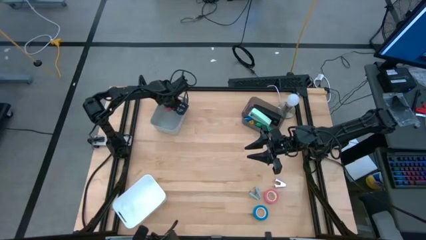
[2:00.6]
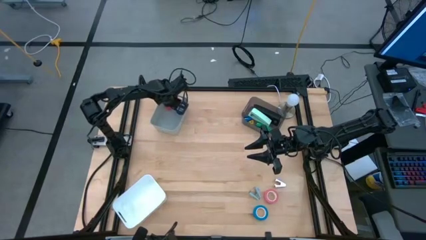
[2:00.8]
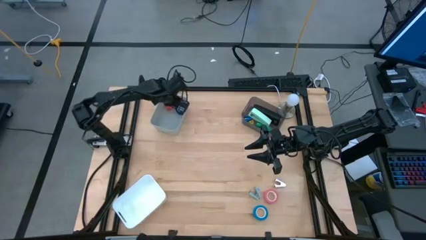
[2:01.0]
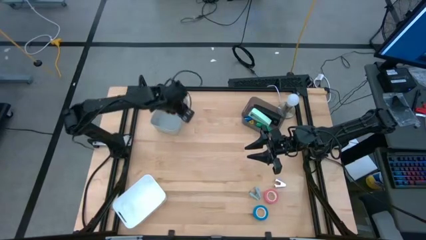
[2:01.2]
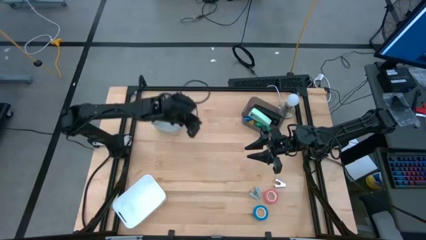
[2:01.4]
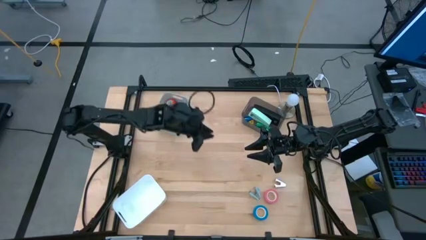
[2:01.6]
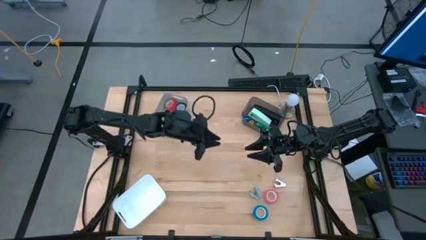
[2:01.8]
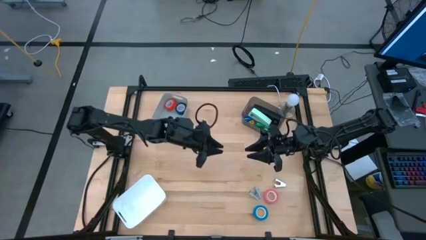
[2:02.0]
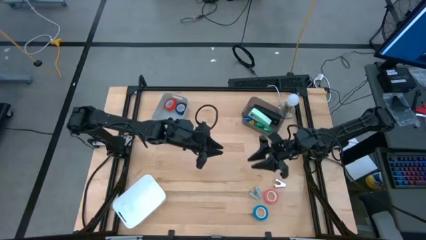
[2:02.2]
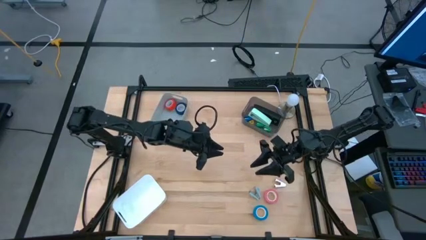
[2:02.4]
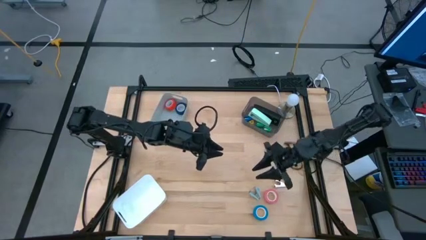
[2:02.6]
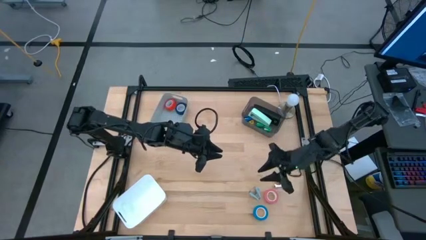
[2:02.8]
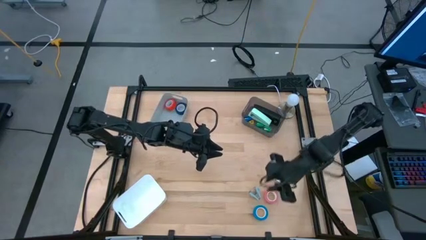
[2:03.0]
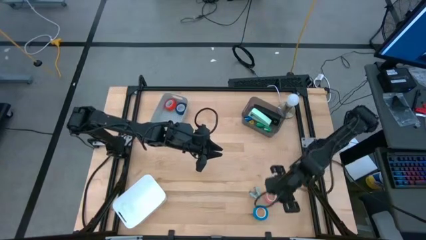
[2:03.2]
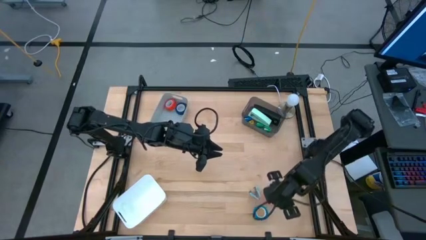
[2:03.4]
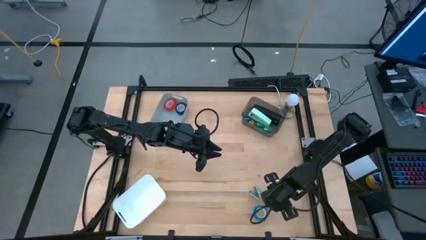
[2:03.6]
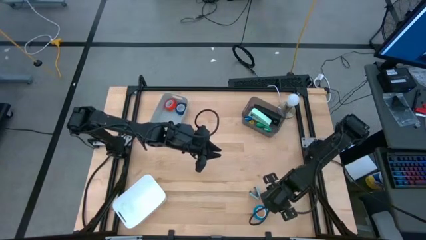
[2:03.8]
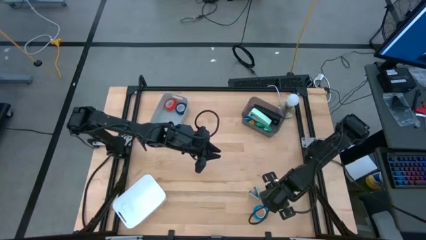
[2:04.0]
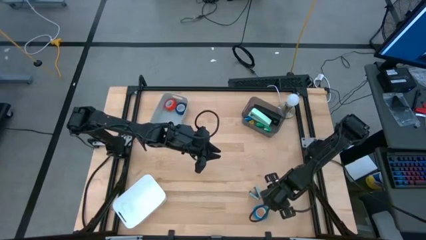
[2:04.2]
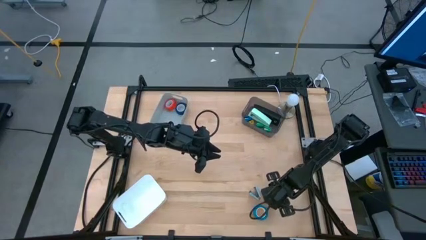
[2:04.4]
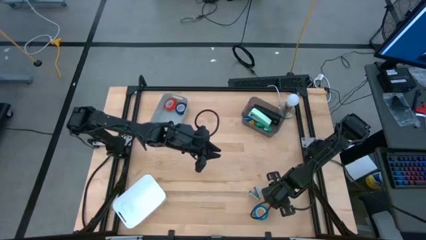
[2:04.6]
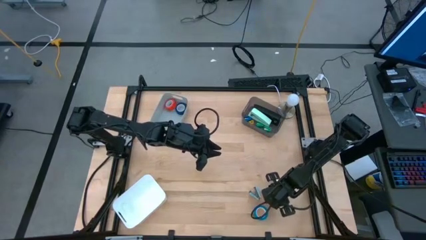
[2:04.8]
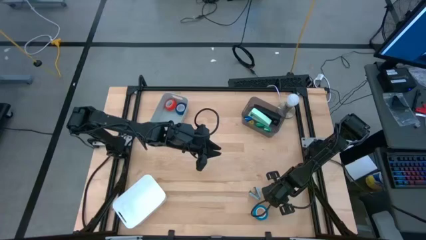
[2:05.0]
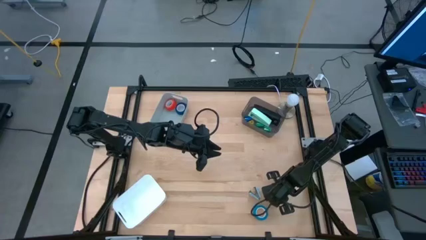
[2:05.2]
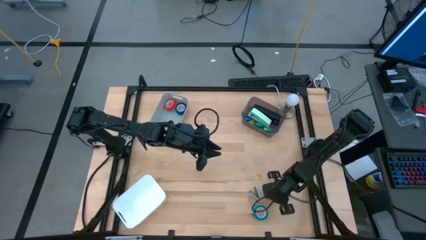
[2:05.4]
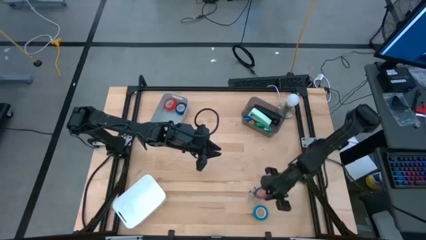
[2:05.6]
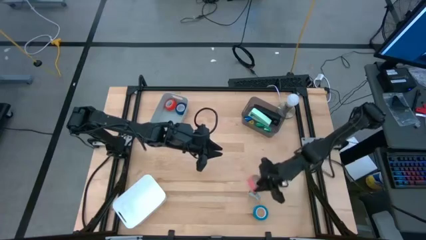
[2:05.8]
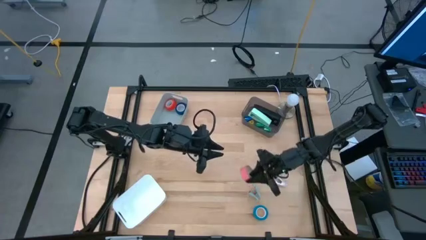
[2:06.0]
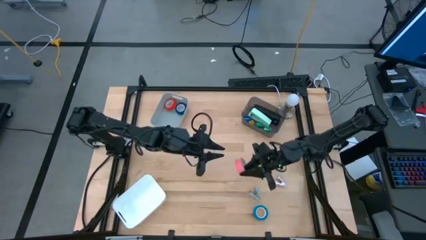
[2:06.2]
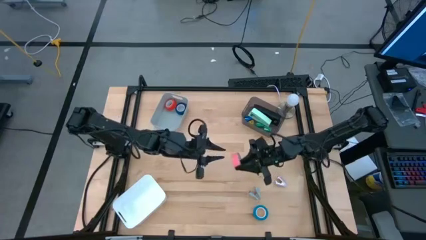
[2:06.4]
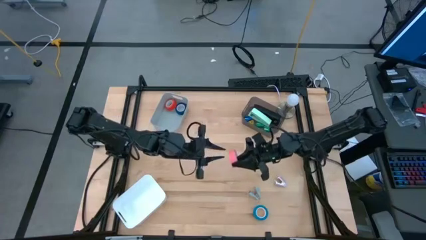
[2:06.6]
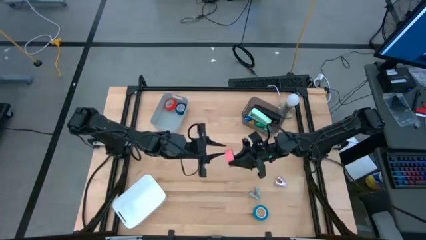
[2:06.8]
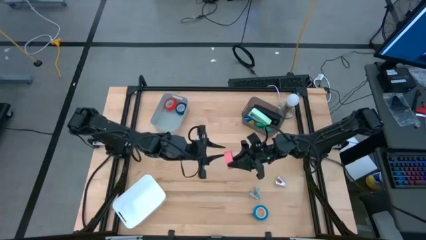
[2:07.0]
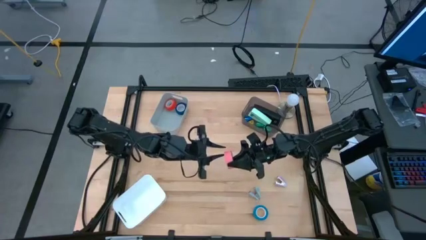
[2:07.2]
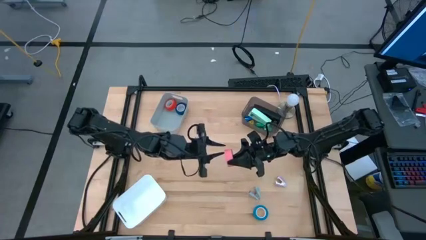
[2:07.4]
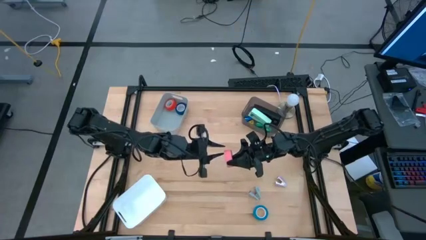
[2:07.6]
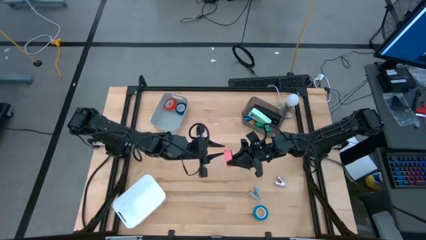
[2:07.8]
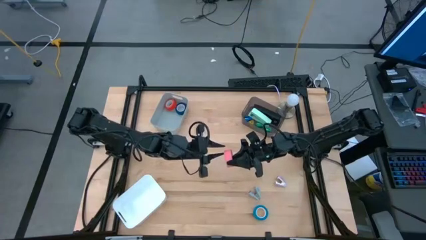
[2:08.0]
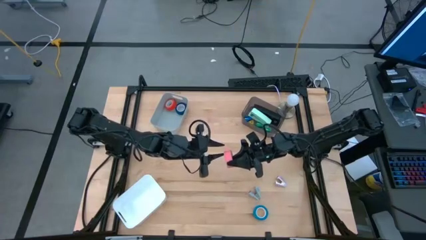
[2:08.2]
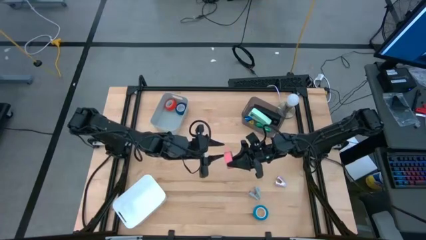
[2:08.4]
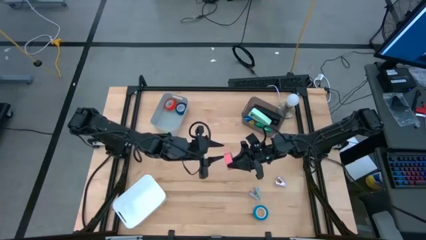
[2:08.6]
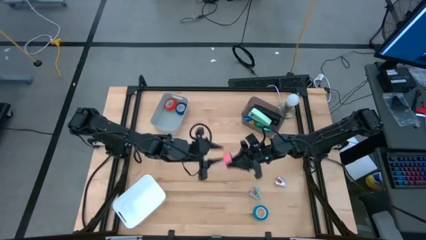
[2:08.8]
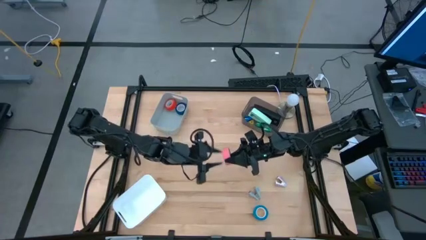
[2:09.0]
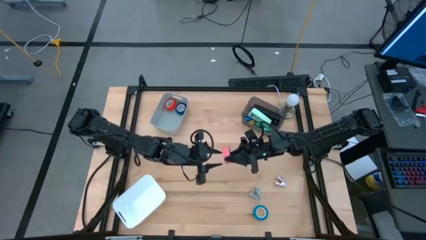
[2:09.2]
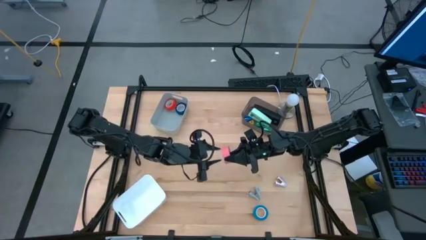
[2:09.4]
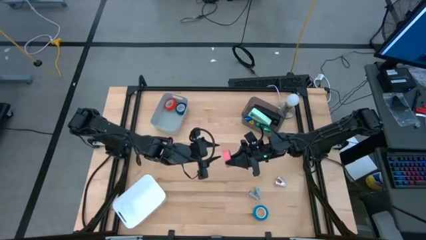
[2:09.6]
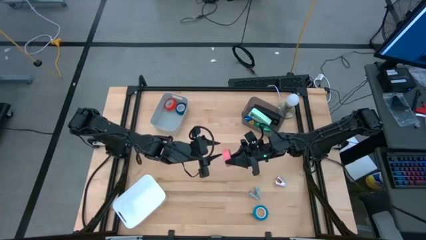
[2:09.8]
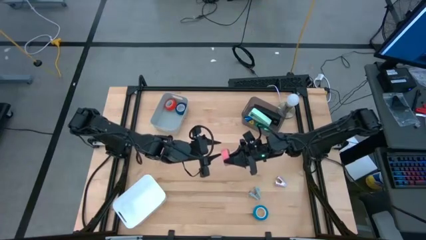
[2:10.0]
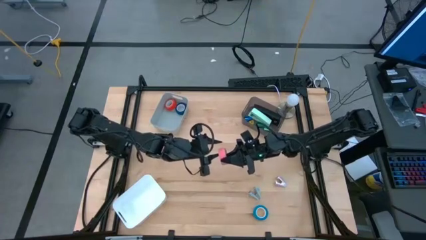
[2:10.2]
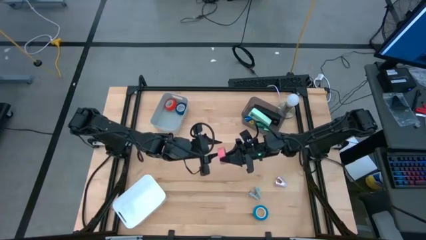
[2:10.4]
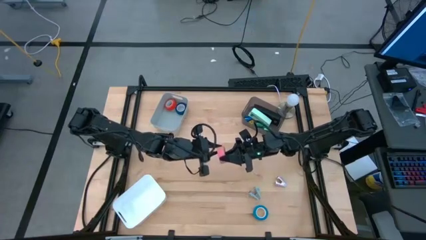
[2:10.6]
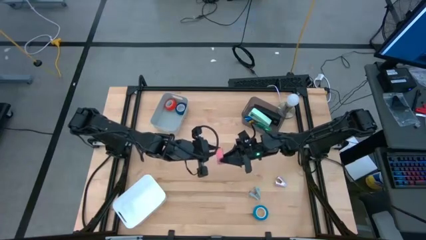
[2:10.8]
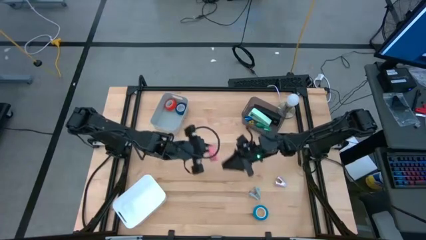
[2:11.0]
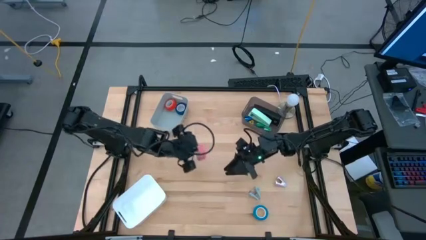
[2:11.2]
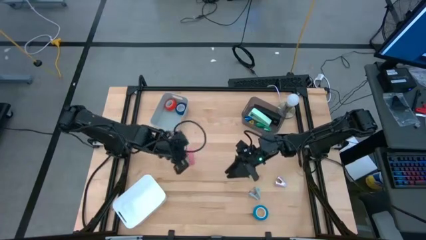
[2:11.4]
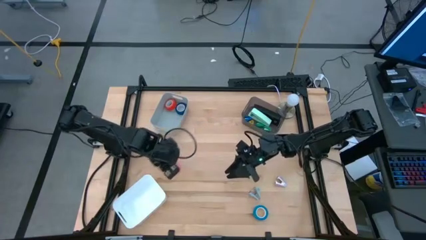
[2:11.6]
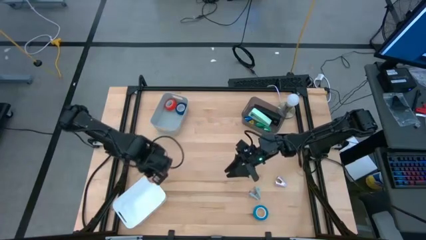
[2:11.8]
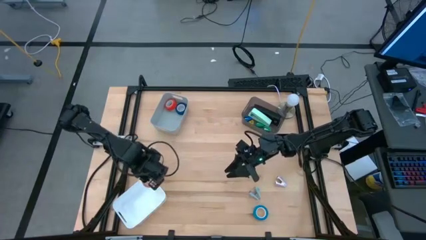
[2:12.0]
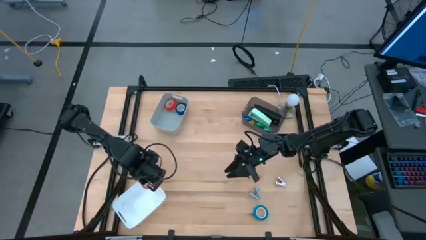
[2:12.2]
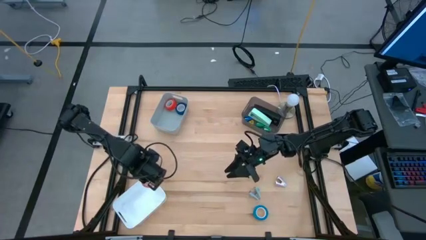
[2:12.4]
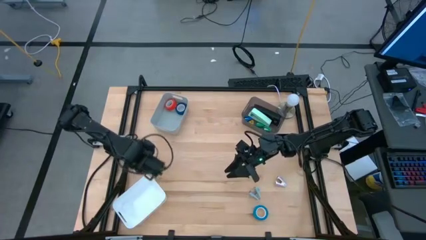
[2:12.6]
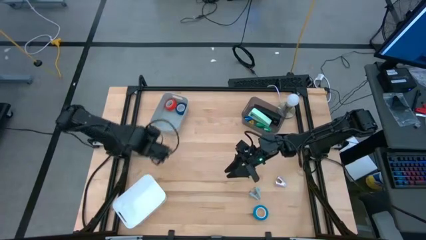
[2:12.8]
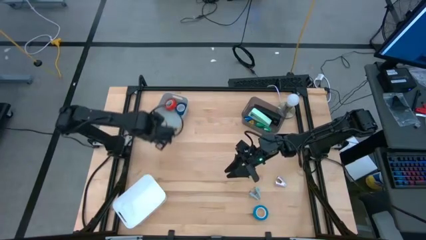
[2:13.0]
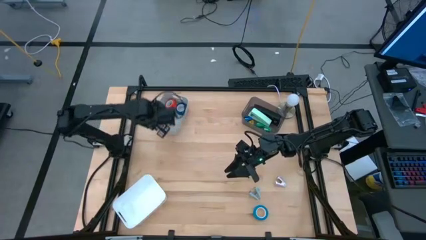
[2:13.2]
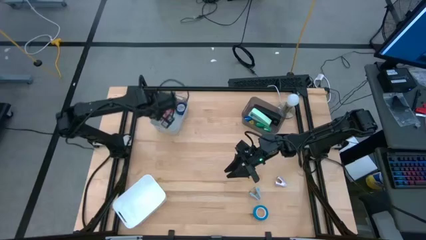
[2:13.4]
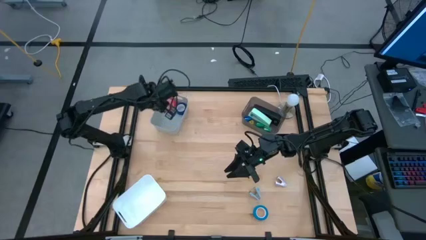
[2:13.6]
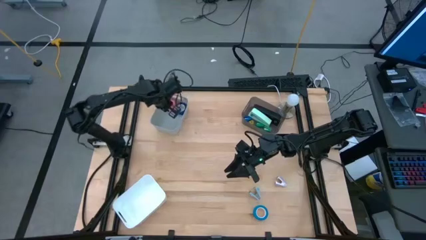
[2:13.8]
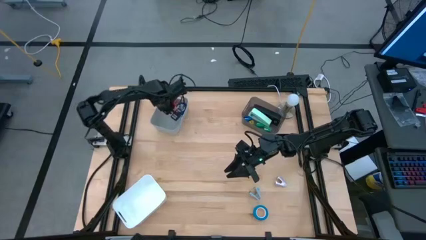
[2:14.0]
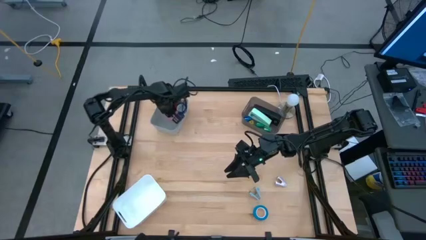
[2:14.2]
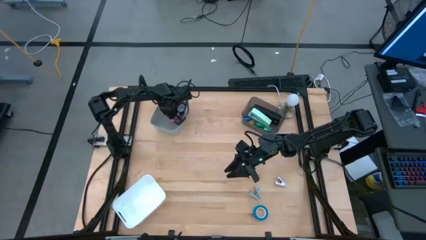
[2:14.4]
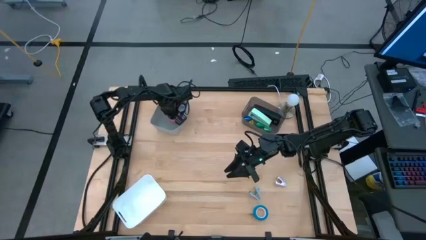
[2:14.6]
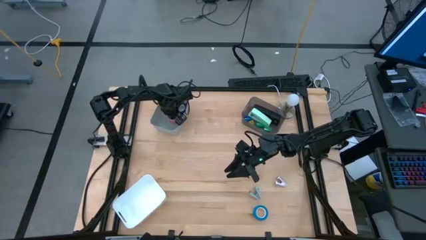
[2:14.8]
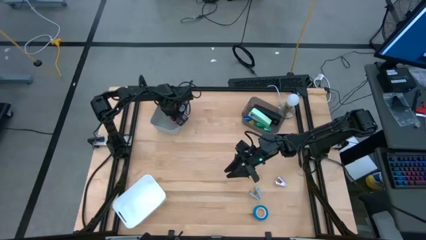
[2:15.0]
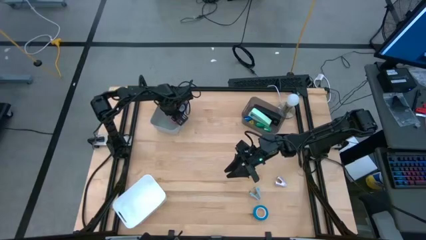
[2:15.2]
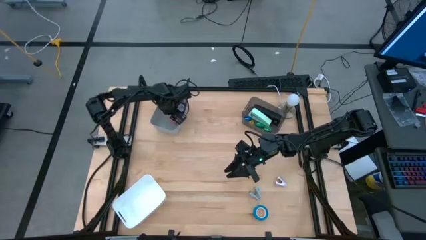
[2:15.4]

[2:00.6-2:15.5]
Task: Pick and place Stapler, Stapler remover, tape
Put the pink tape into the gray bin
